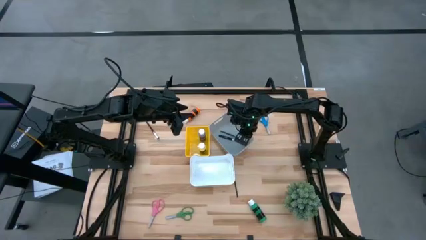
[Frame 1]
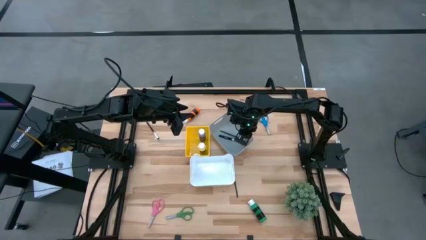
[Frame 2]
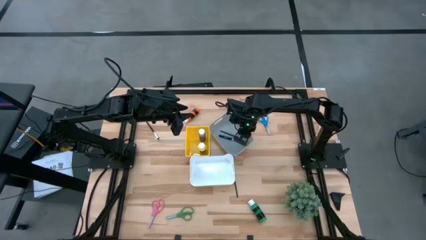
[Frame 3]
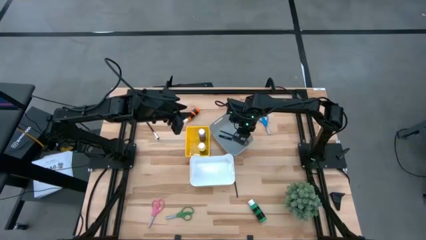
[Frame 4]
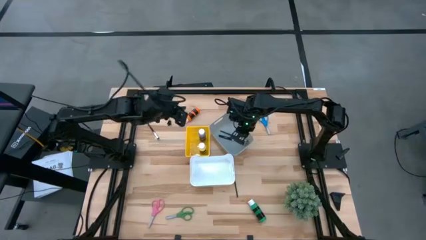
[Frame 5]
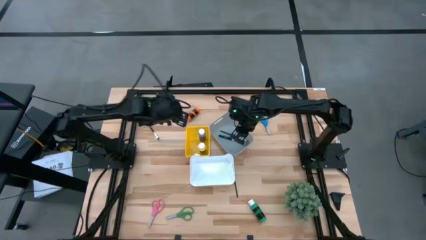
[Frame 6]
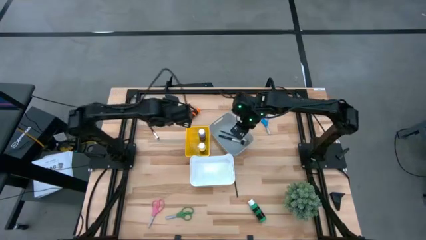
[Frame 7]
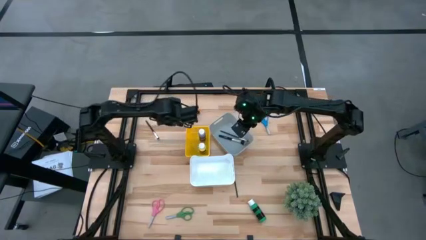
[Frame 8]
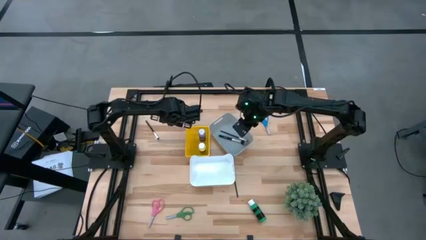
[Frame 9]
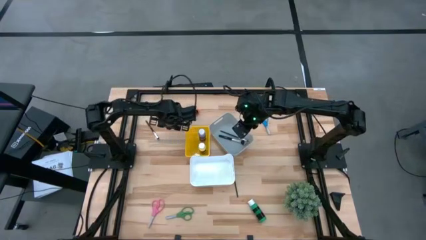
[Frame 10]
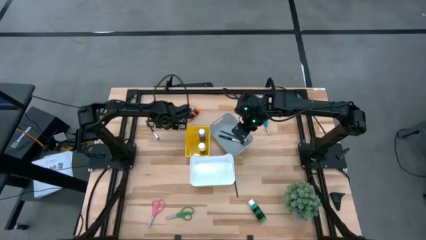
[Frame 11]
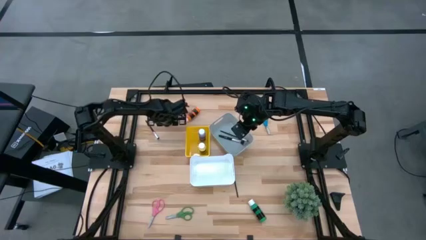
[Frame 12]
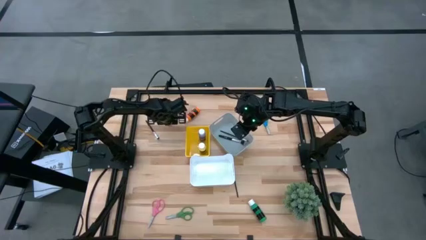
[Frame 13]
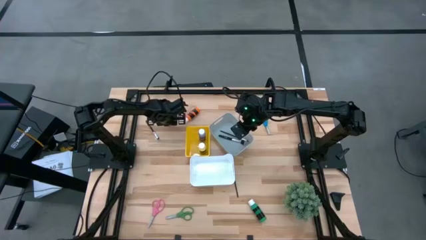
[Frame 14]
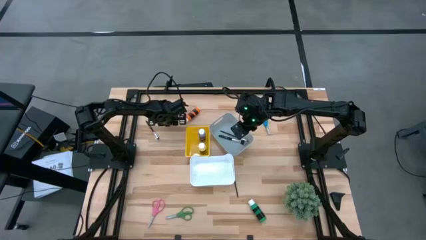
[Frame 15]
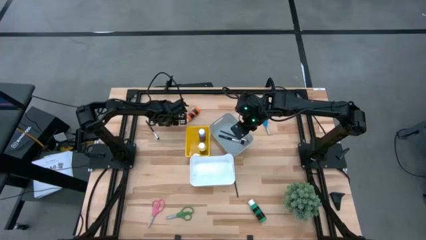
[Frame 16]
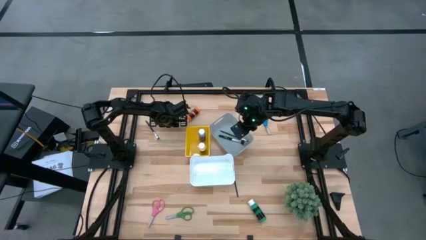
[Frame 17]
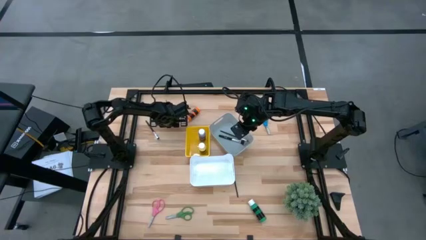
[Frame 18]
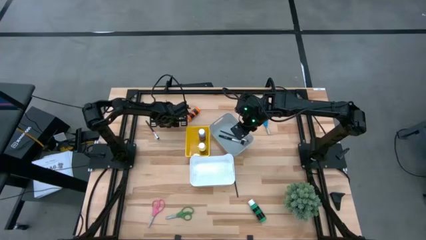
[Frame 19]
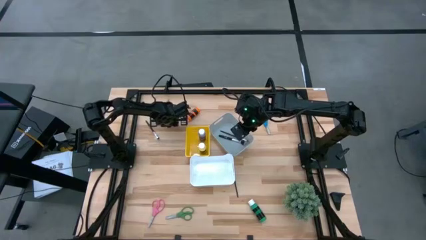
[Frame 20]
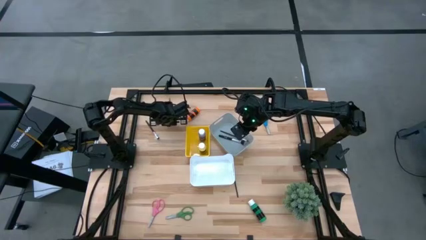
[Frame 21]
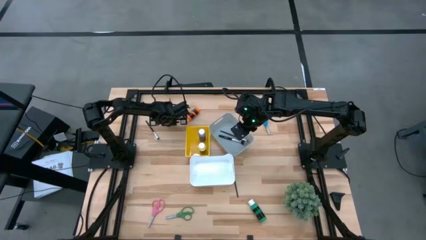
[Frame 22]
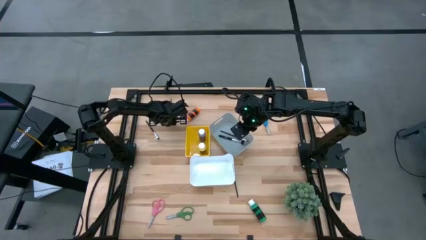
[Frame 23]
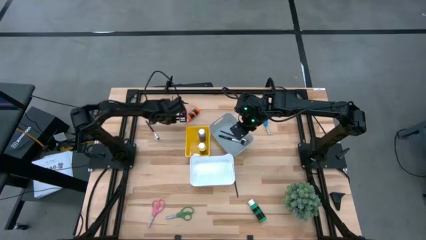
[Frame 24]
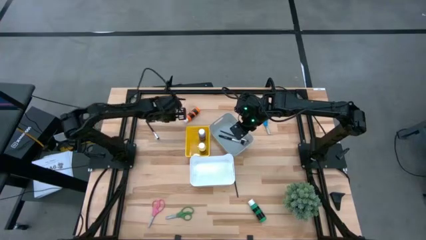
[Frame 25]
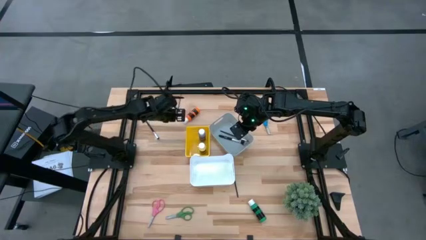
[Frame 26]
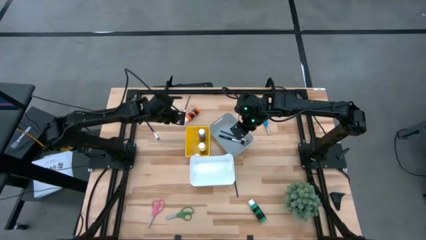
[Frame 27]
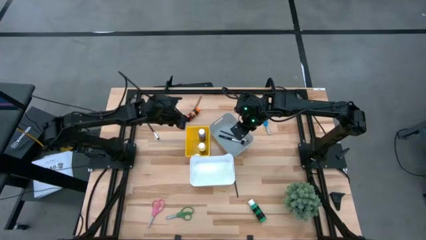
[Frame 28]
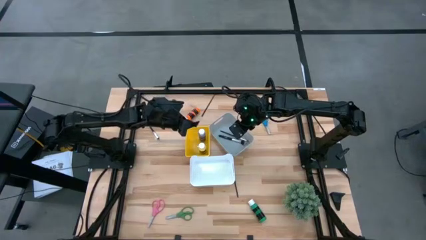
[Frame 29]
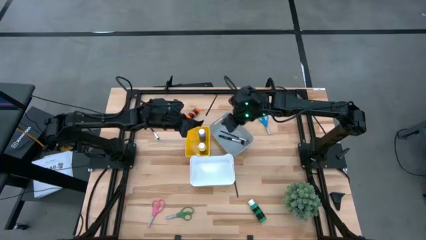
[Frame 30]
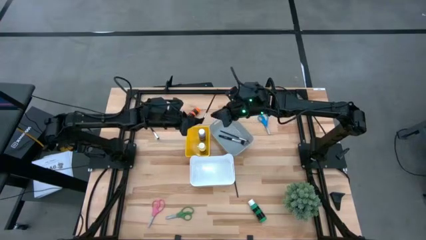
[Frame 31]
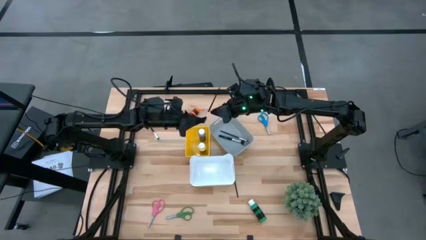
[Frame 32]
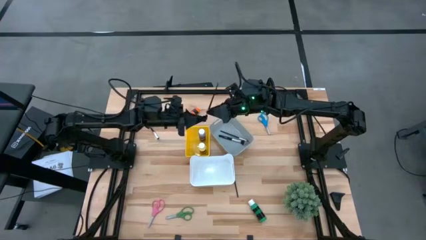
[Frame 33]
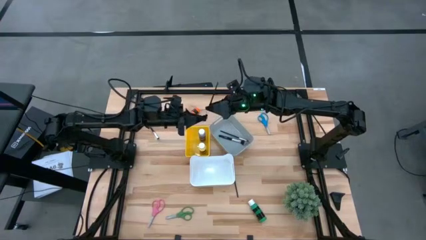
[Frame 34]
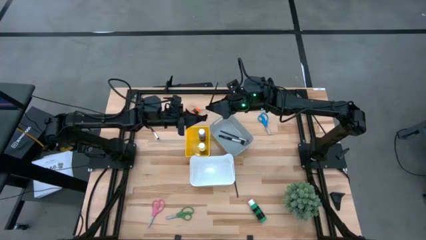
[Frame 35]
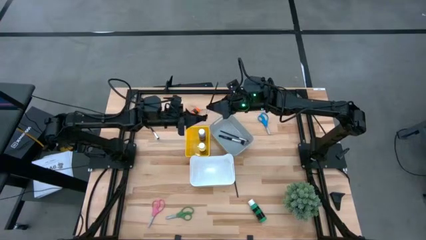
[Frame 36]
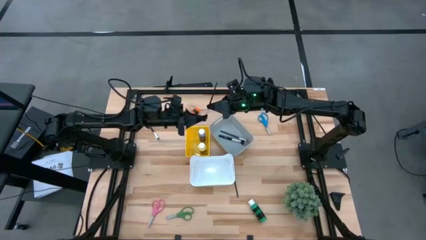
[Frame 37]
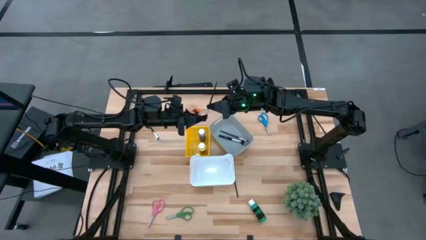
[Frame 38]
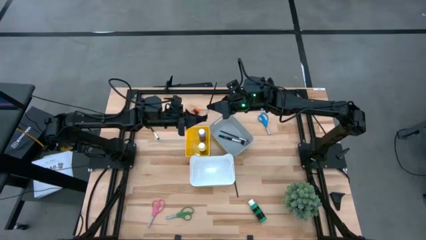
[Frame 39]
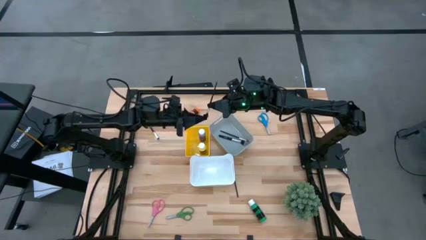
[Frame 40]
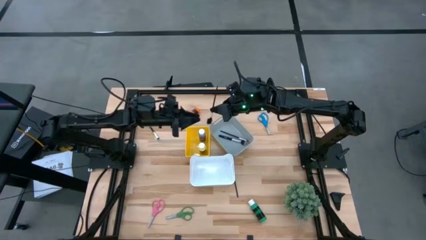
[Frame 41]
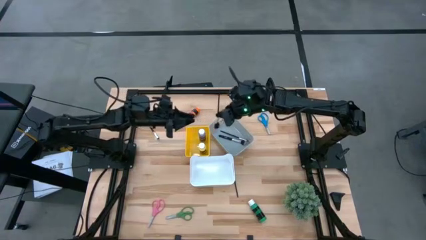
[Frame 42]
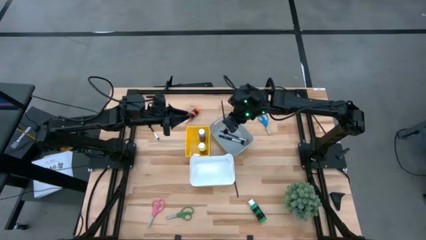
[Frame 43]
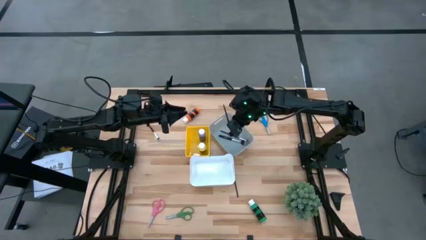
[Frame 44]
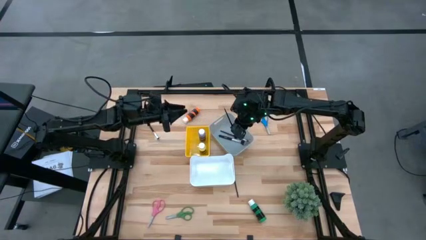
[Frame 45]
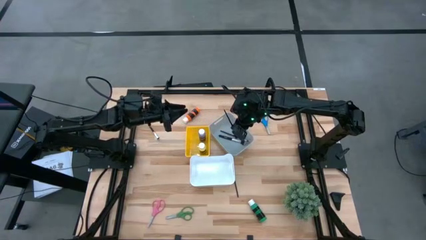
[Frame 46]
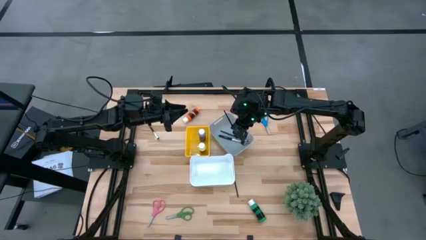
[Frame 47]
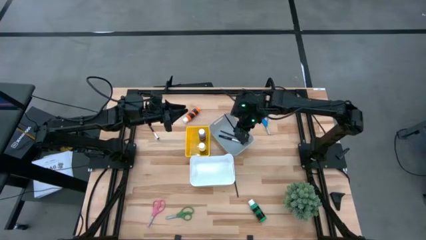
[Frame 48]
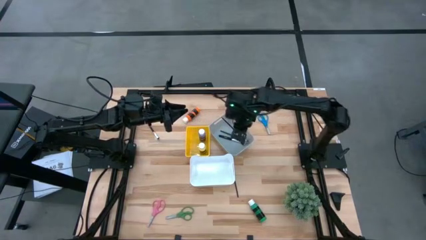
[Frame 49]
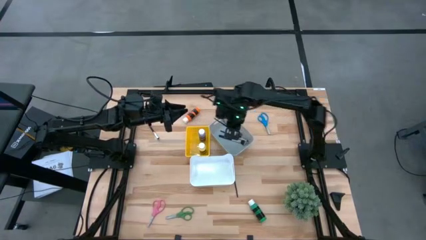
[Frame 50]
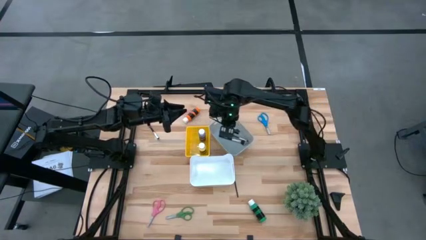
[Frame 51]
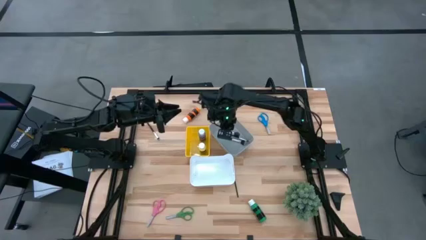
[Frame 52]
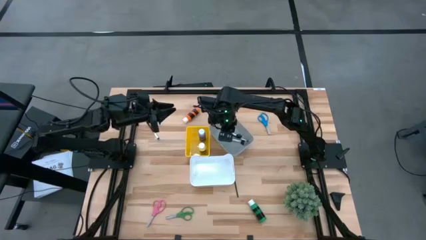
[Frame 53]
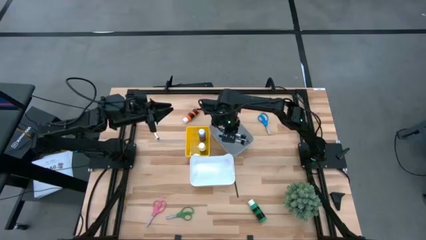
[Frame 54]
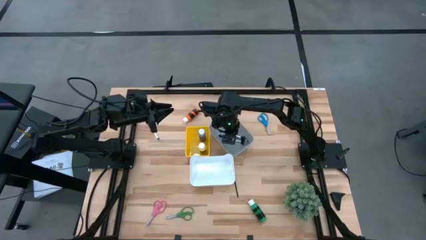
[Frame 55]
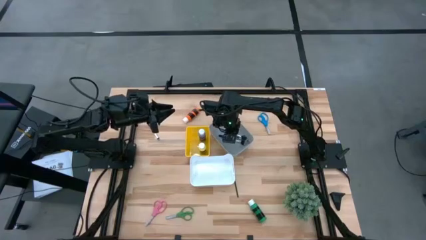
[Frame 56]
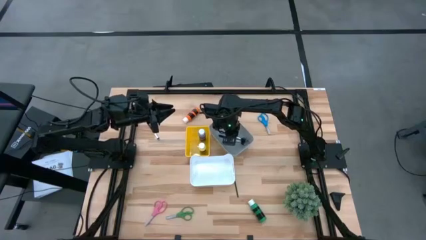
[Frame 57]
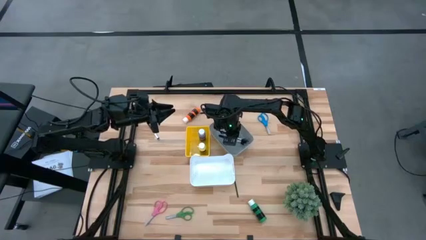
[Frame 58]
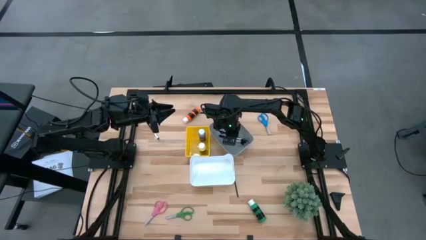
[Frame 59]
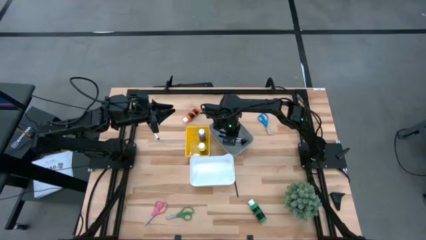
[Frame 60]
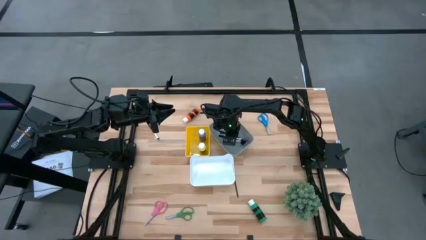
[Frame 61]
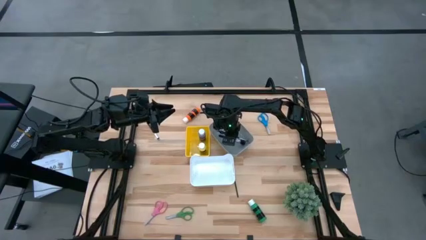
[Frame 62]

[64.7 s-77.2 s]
Task: Pick & Place Paint Supplies
Put the eye groomer brush into the gray bin

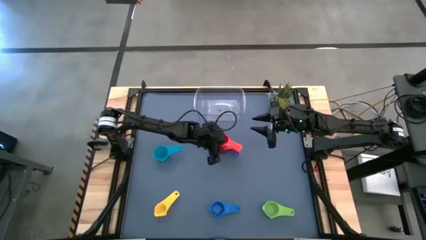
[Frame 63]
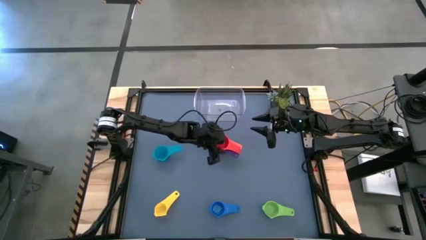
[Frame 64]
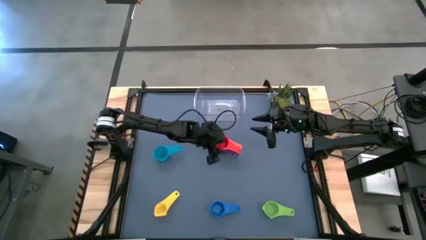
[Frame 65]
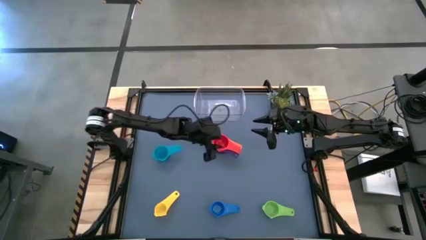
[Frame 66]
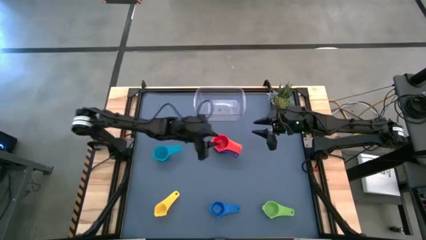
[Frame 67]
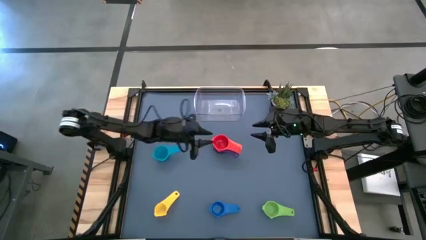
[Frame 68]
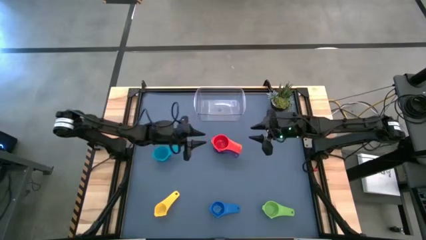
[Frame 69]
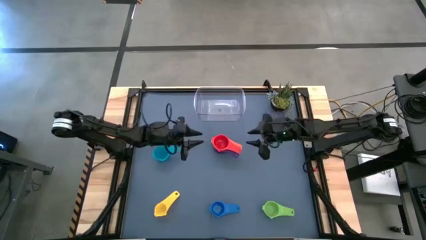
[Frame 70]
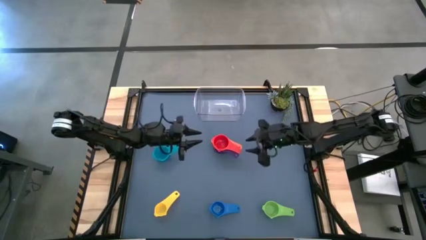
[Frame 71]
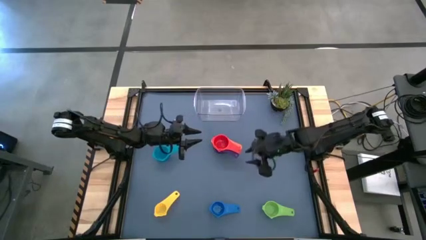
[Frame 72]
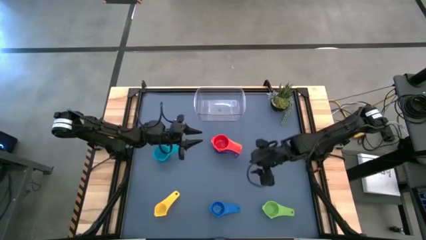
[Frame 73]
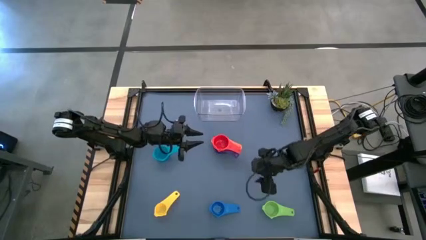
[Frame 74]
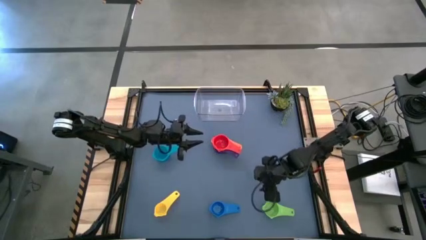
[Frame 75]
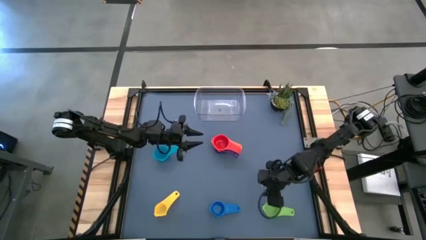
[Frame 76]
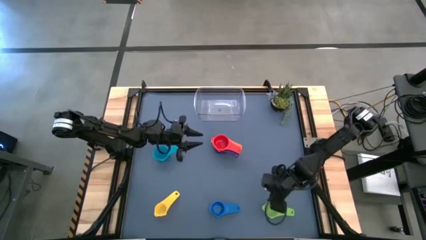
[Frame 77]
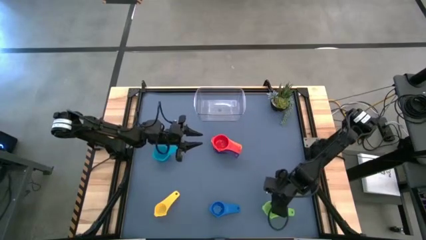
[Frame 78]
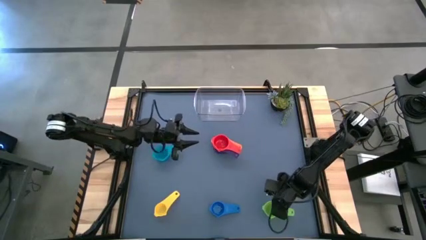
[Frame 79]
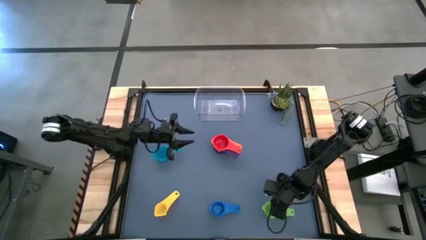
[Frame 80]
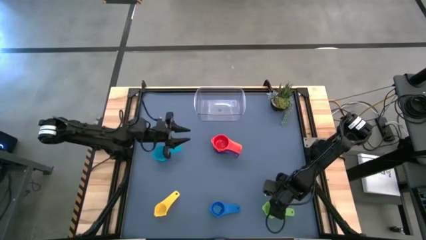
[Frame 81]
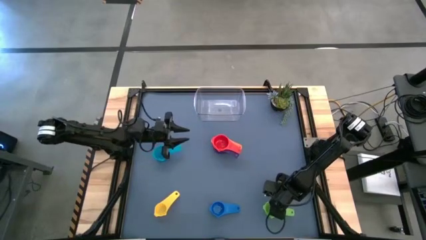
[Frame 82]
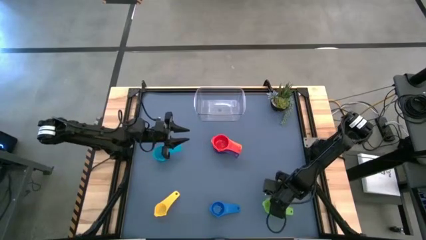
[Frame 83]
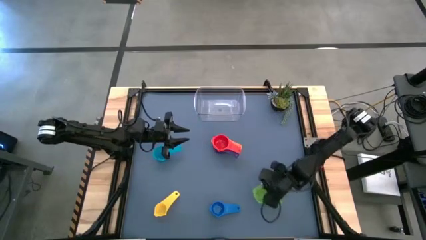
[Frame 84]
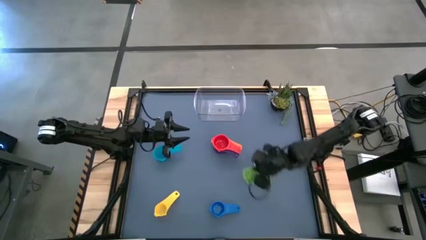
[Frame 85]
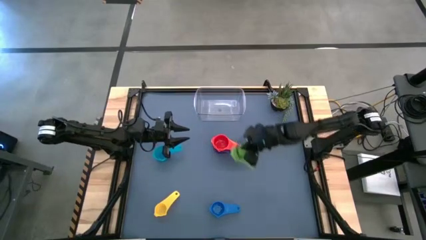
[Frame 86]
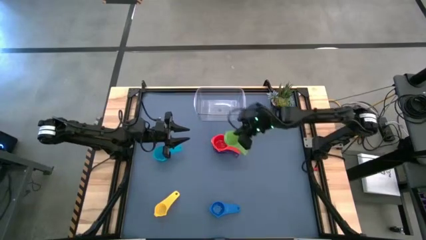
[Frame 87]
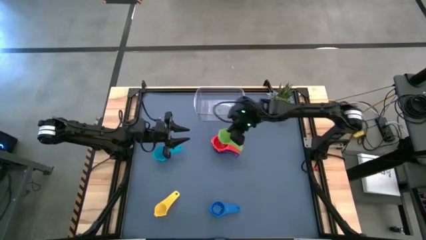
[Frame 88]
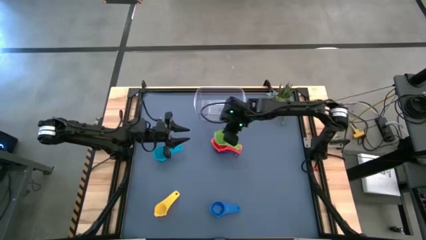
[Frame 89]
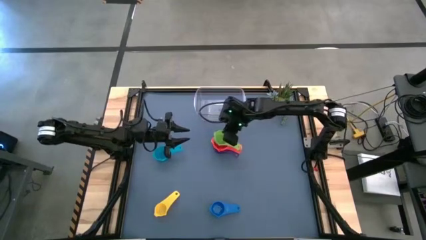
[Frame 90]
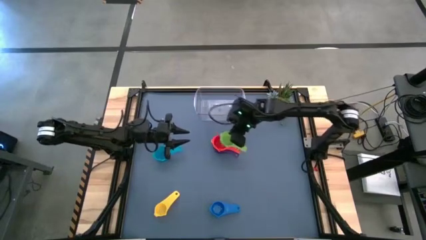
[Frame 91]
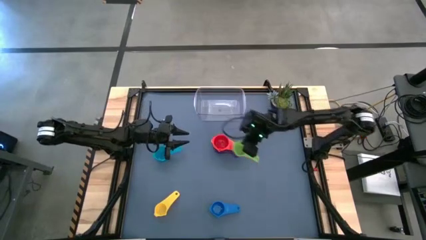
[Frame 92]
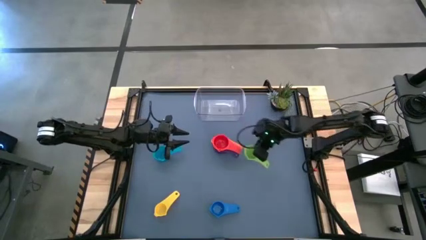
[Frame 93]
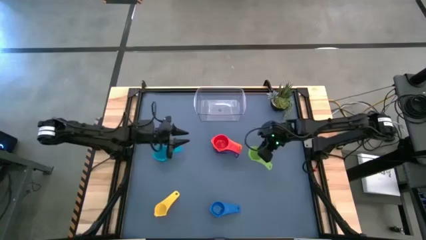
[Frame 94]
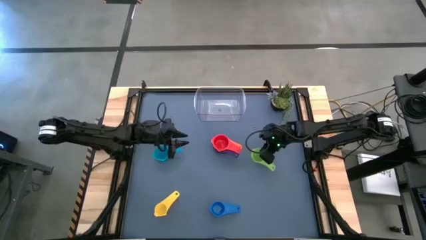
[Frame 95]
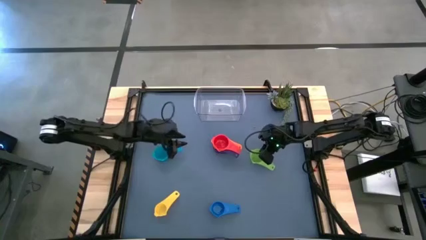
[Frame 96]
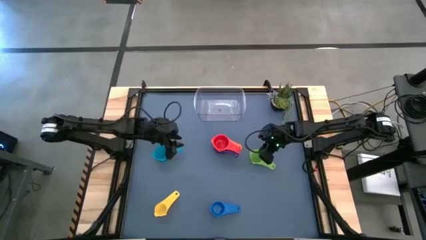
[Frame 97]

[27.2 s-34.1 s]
Task: Nest measuring cups in basket
Stack the green measuring cup on top of the red measuring cup
